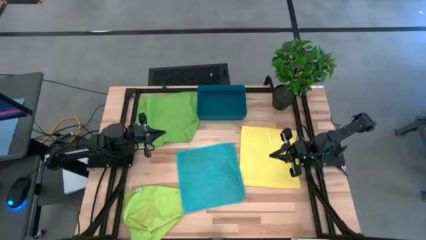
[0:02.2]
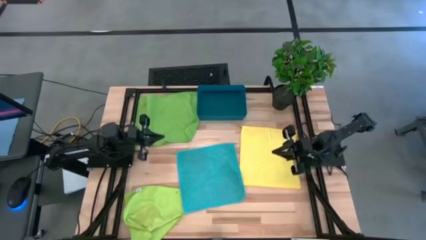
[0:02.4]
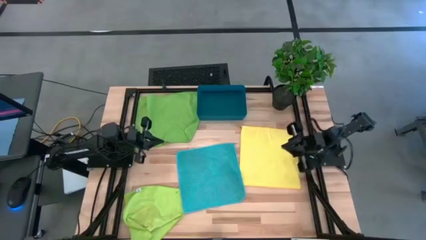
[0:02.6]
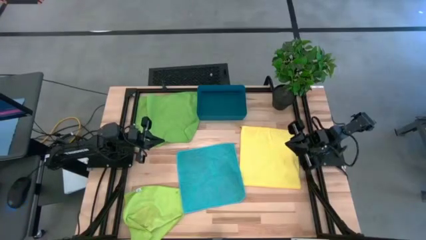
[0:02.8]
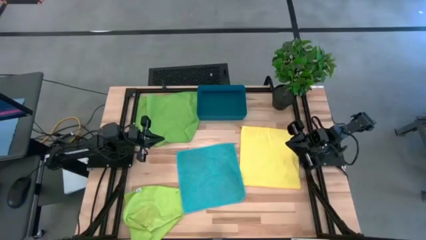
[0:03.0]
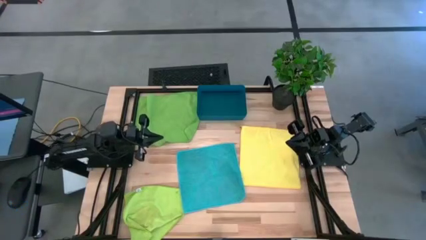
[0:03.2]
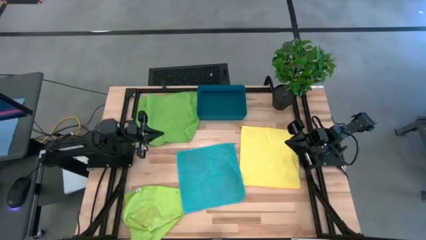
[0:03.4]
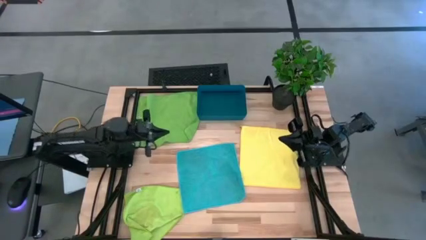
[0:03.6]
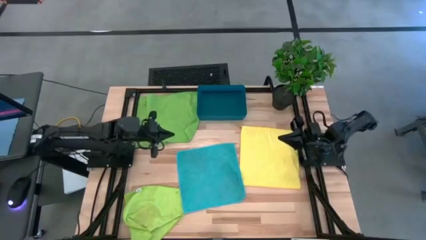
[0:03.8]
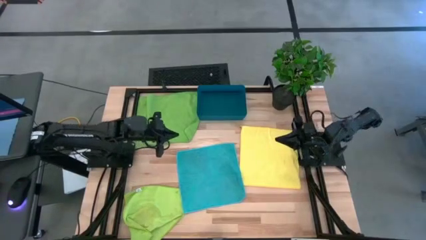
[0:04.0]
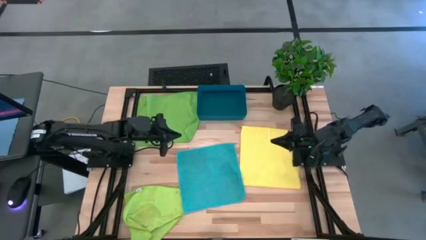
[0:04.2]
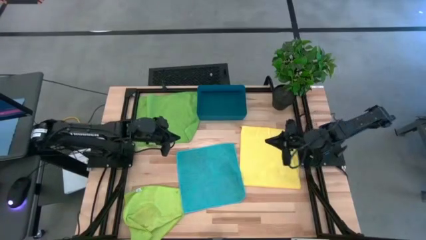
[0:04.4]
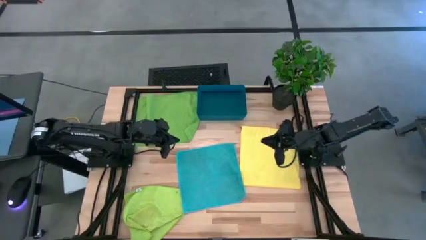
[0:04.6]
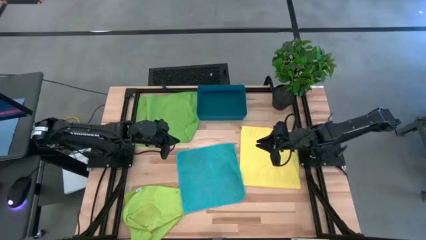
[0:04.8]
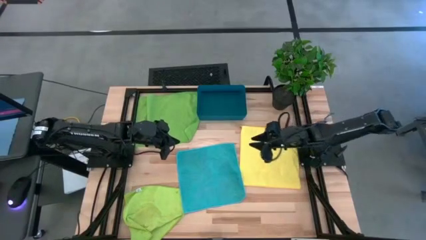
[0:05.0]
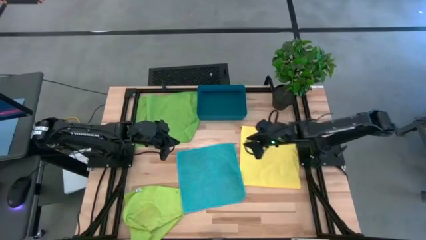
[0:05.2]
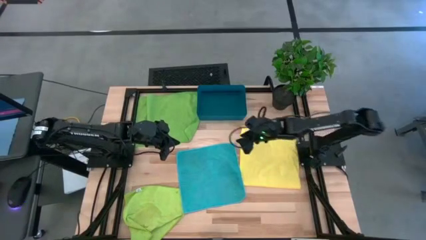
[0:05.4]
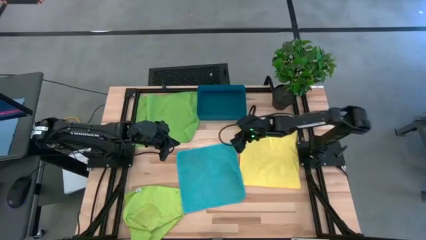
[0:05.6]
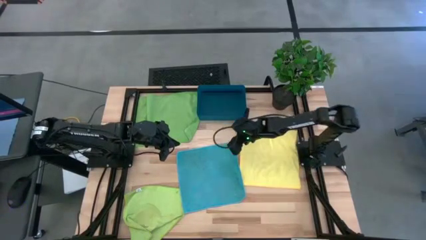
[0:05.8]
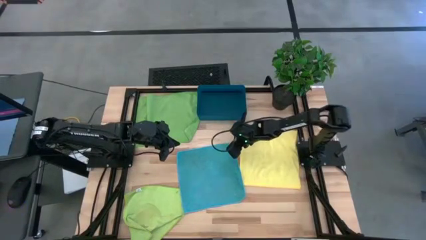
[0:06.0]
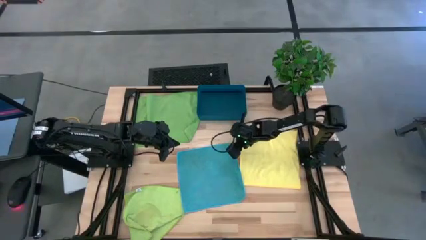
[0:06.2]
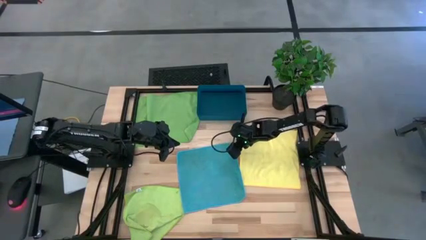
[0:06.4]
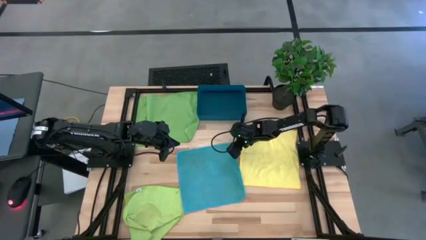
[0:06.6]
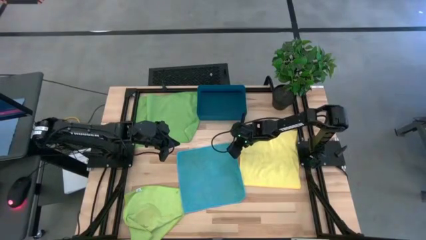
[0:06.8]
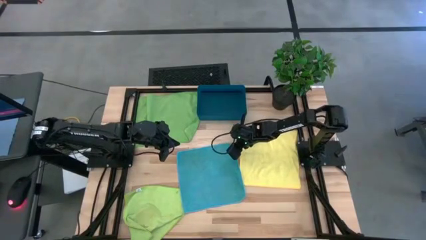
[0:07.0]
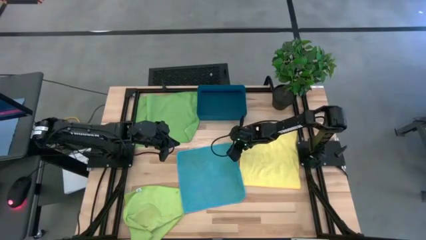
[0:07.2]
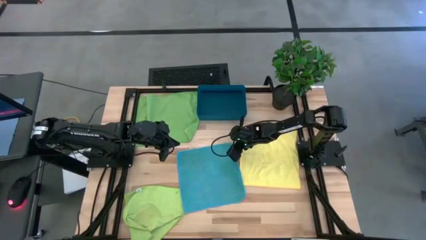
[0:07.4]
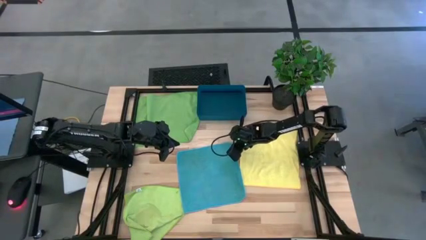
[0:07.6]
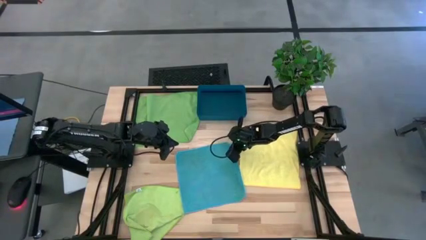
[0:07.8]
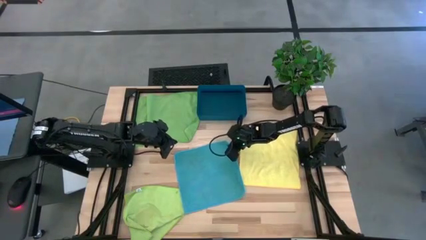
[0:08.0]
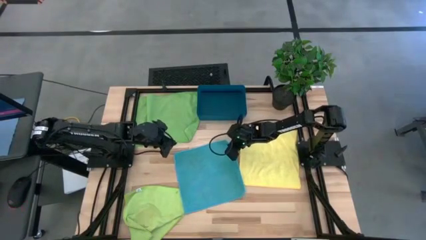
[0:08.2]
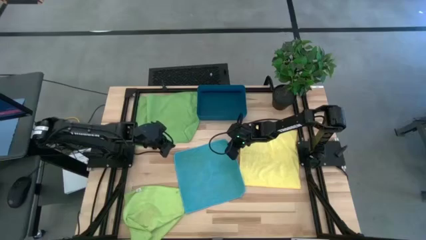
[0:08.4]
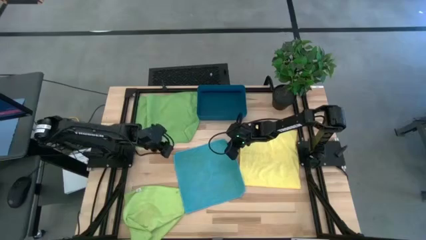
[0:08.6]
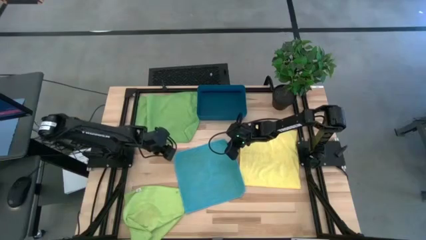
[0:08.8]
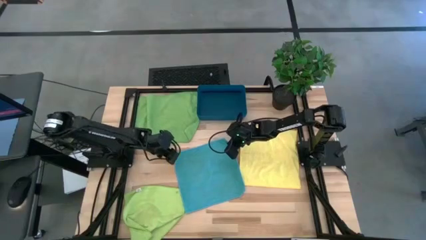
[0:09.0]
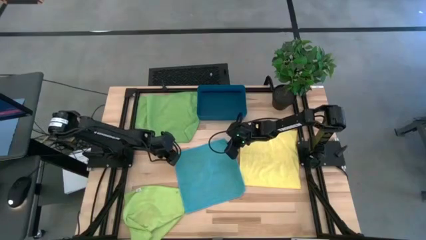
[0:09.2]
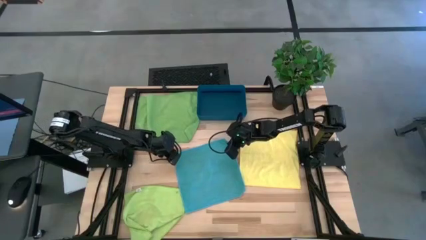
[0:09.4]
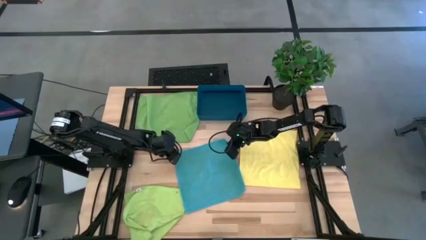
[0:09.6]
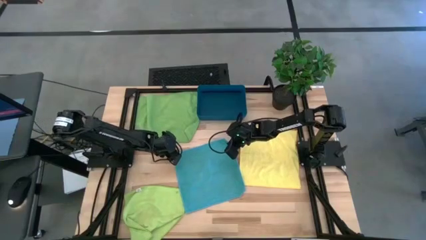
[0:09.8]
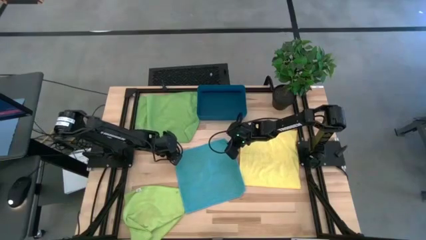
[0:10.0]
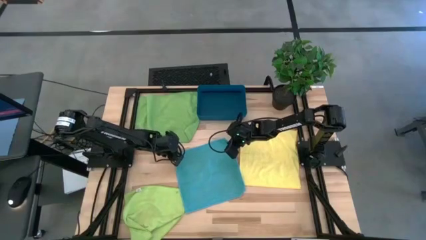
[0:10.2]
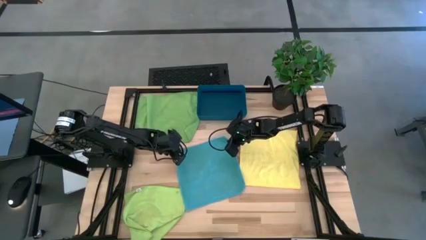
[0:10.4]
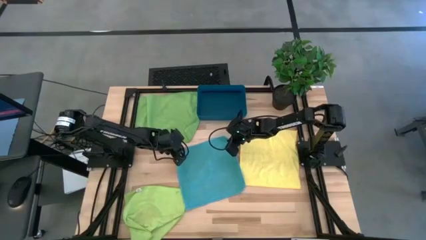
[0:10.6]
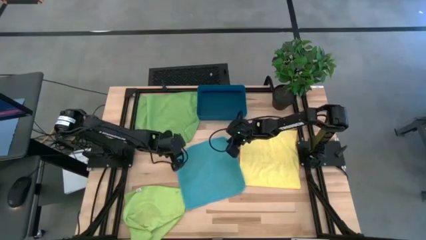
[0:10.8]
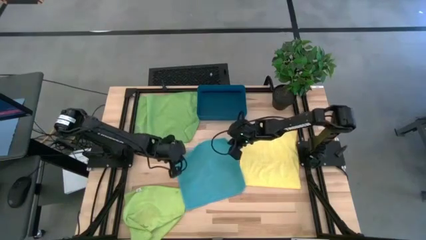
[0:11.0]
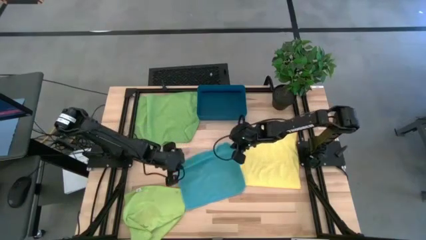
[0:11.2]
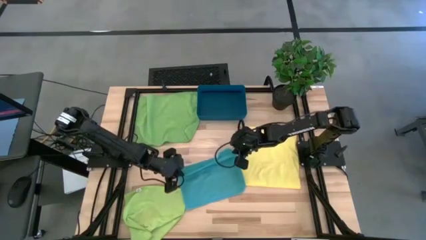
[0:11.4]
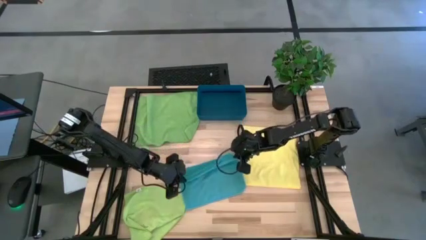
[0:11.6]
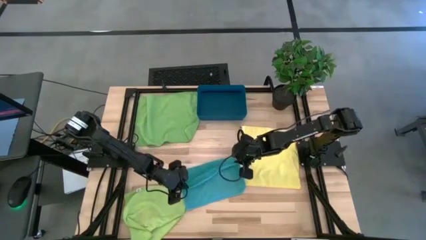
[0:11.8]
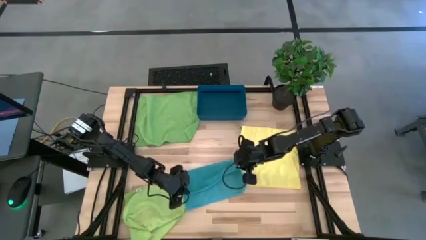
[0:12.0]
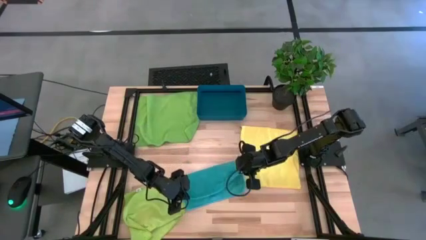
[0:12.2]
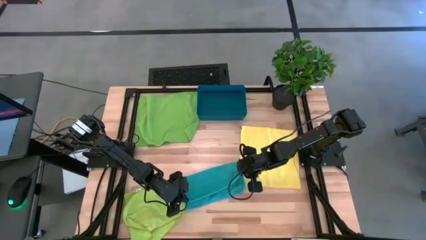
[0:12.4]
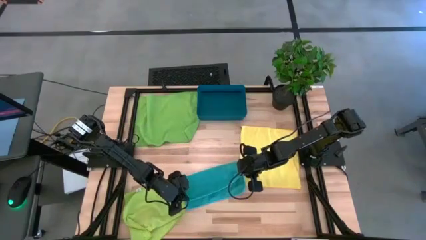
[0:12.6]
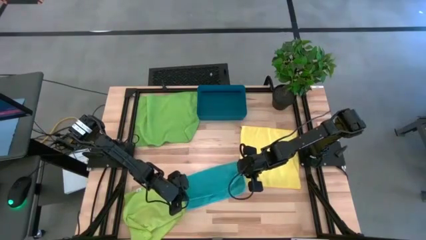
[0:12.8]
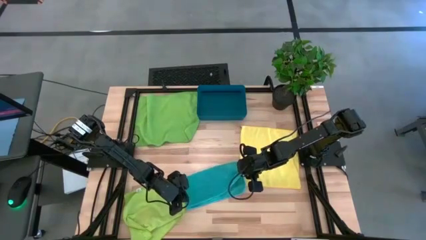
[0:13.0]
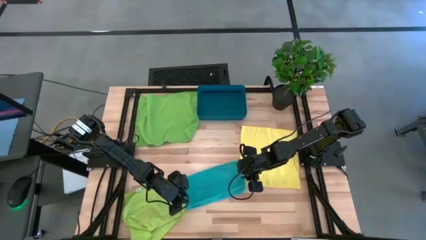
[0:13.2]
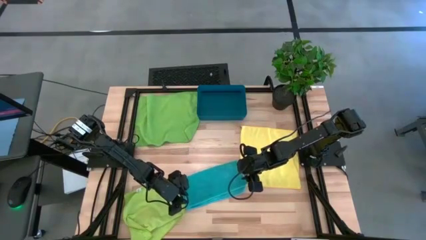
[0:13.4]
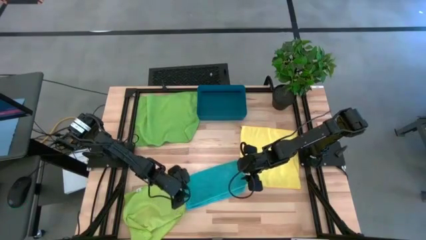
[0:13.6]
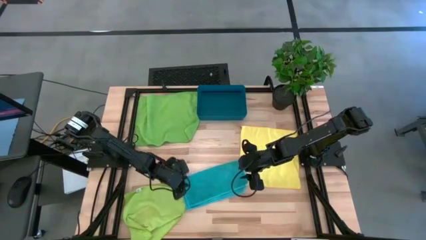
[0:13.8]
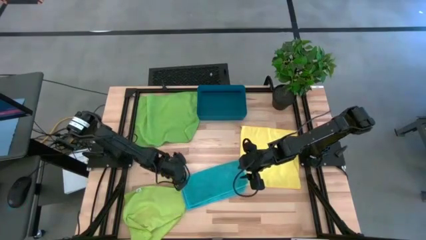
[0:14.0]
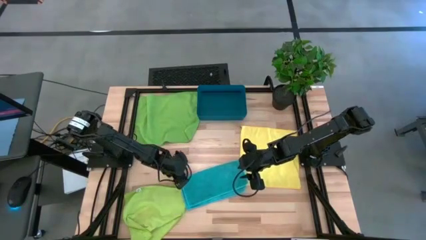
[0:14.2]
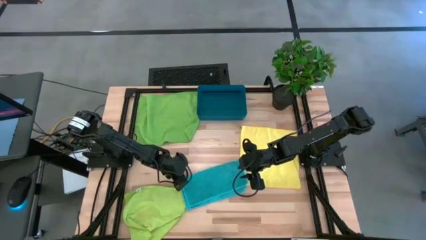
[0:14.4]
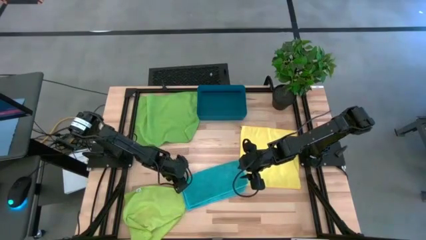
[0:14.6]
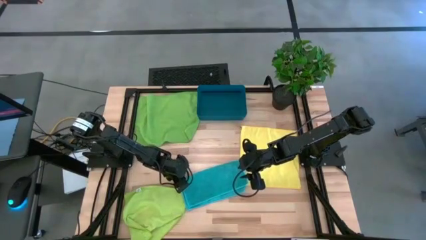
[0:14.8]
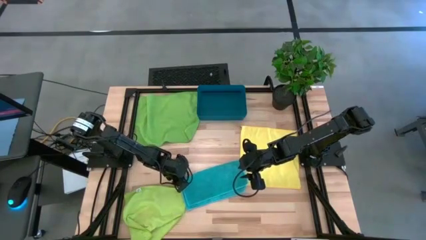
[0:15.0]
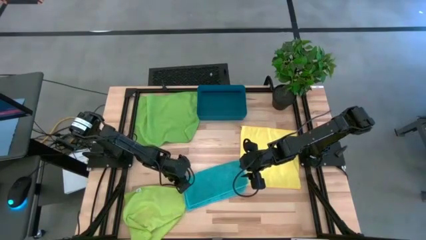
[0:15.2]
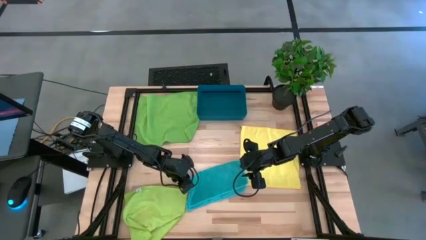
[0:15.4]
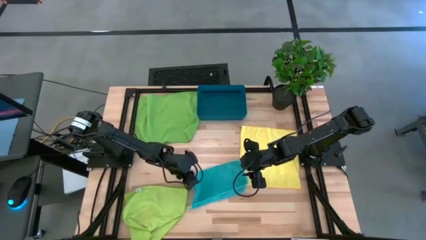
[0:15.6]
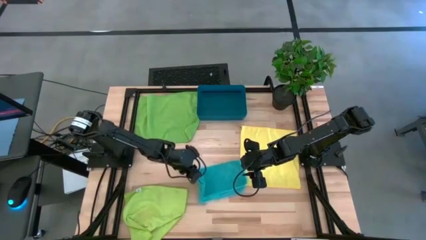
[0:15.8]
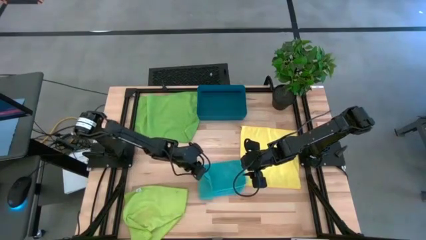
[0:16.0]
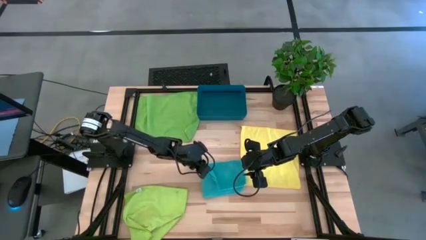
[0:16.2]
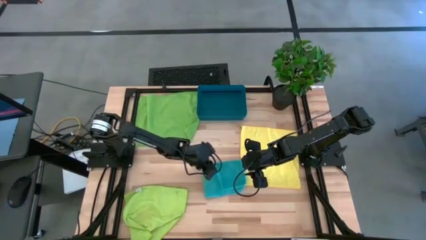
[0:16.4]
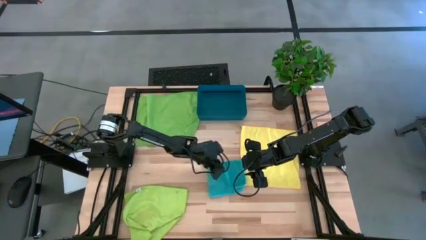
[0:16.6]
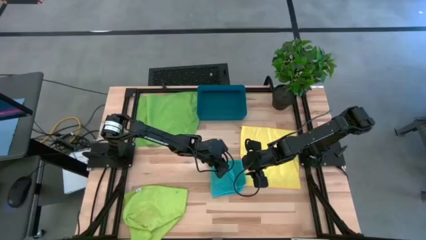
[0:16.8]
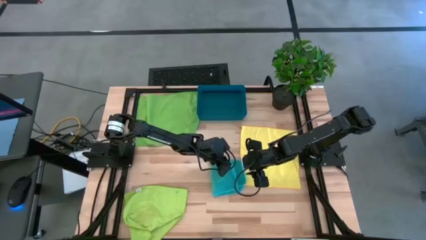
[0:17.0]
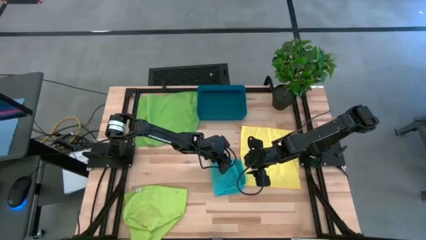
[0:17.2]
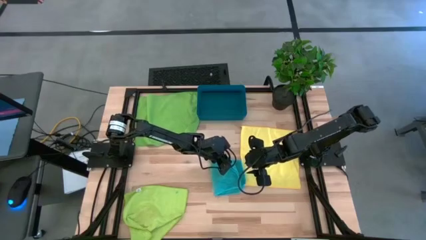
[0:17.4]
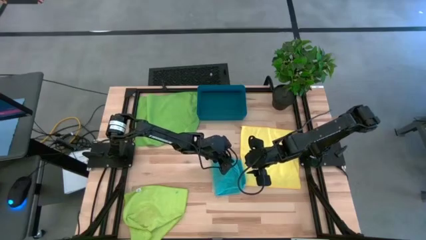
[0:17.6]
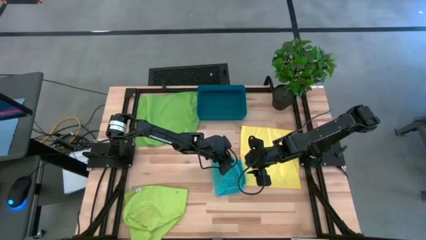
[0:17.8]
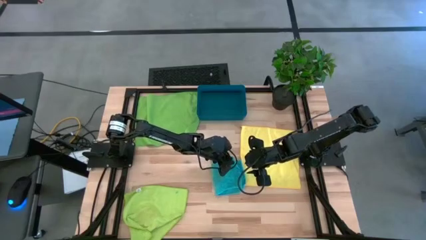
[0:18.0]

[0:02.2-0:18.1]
Task: Fold microfiber towels
Fold the blue microfiber cloth
